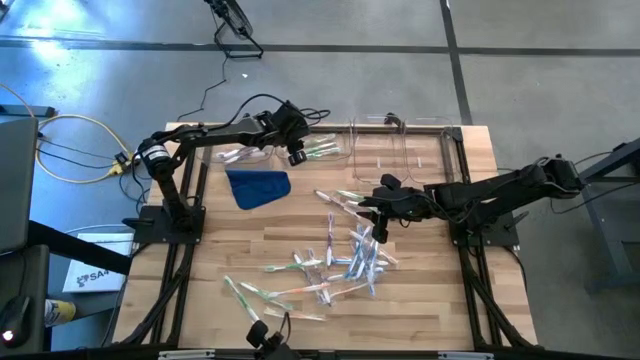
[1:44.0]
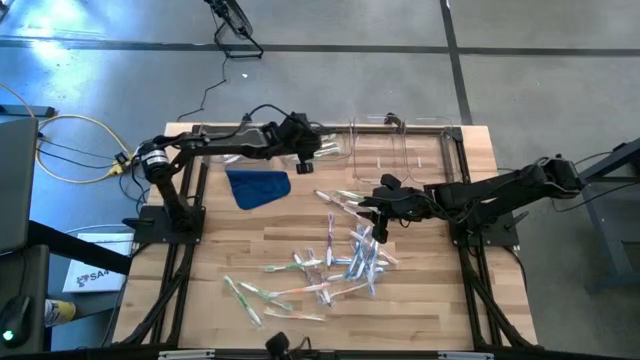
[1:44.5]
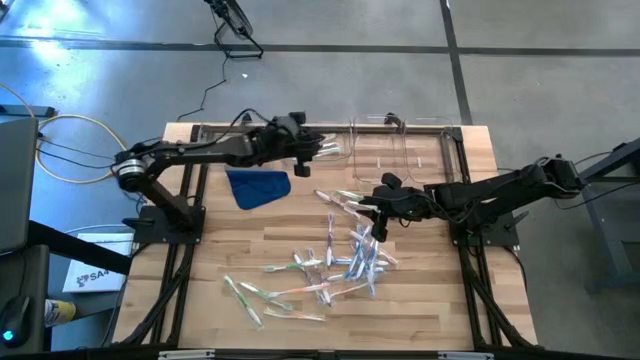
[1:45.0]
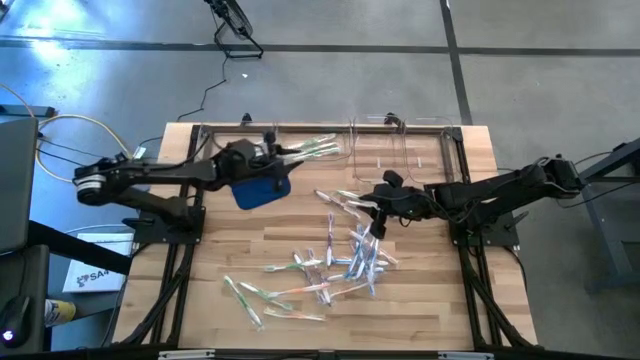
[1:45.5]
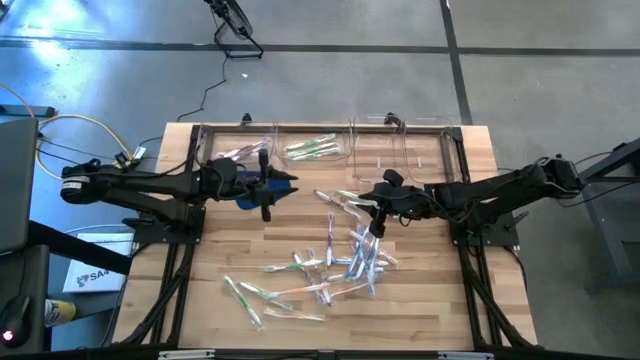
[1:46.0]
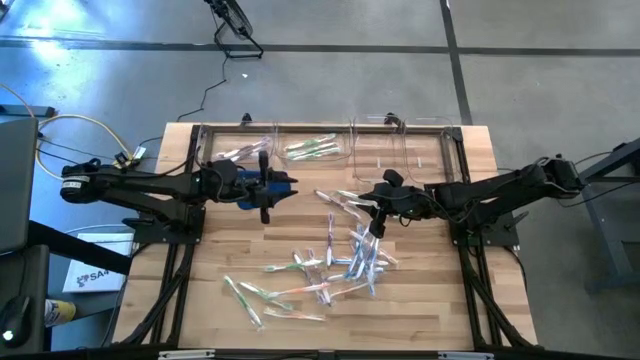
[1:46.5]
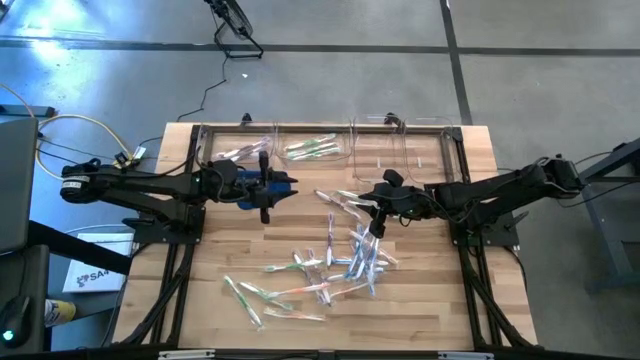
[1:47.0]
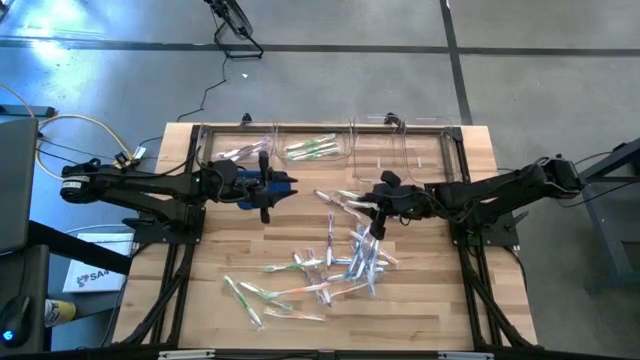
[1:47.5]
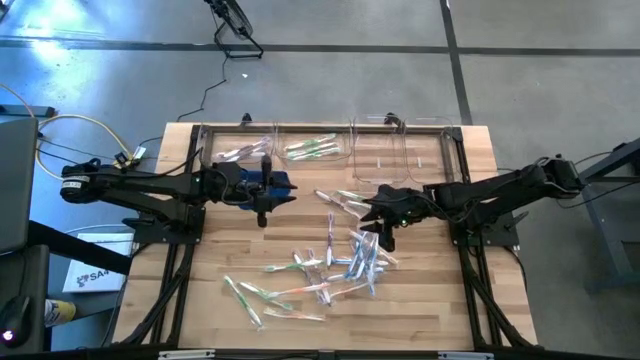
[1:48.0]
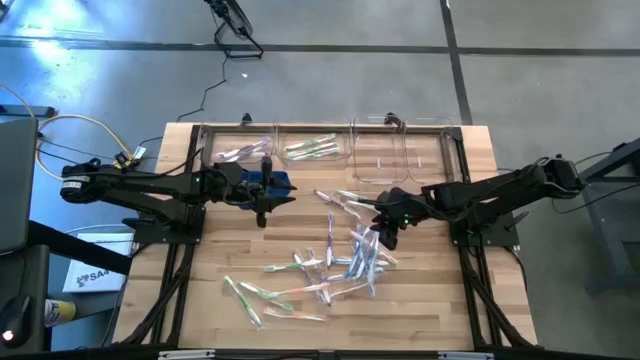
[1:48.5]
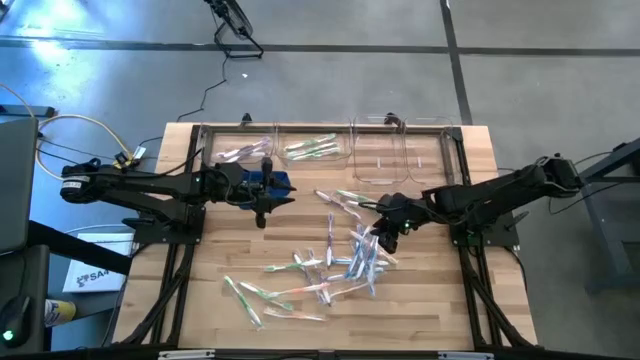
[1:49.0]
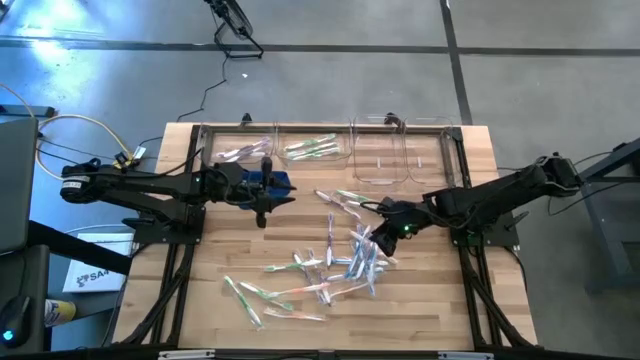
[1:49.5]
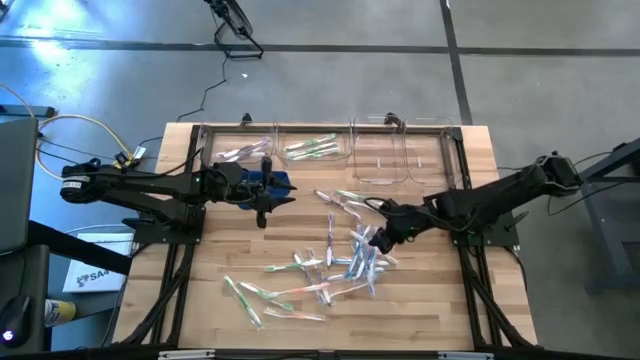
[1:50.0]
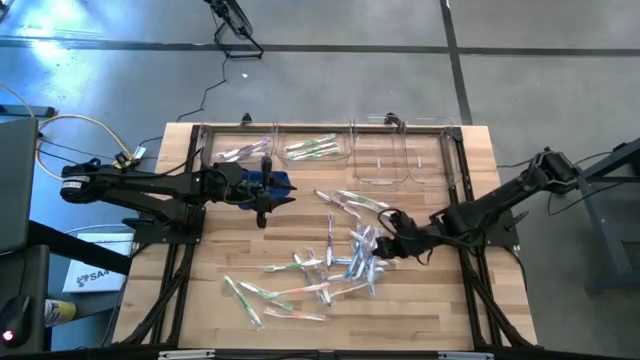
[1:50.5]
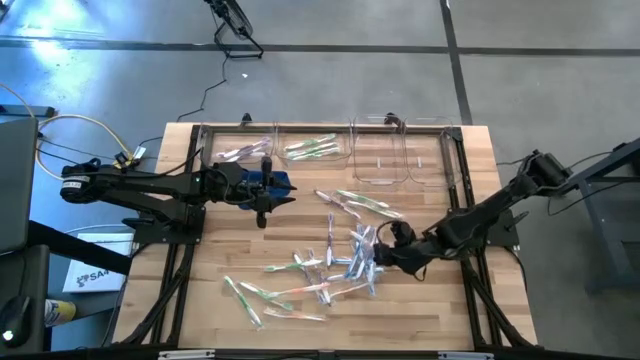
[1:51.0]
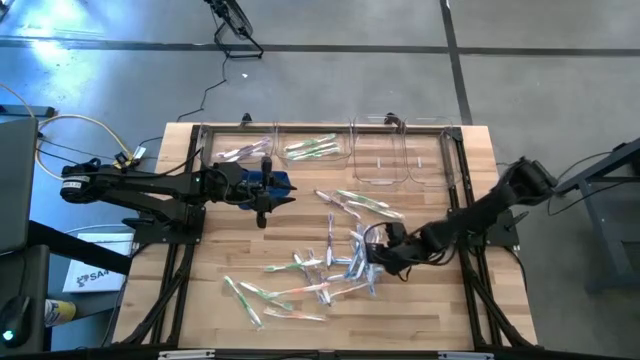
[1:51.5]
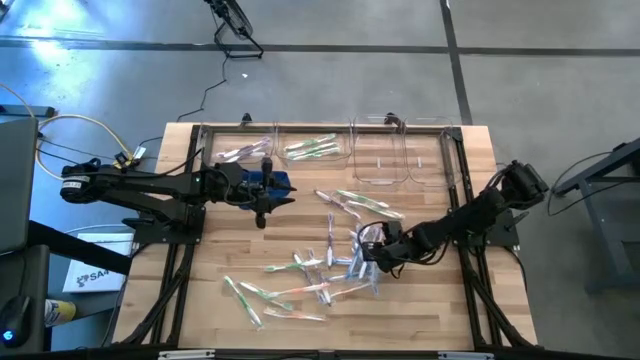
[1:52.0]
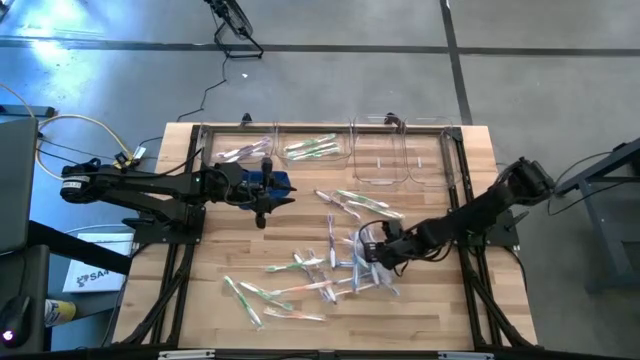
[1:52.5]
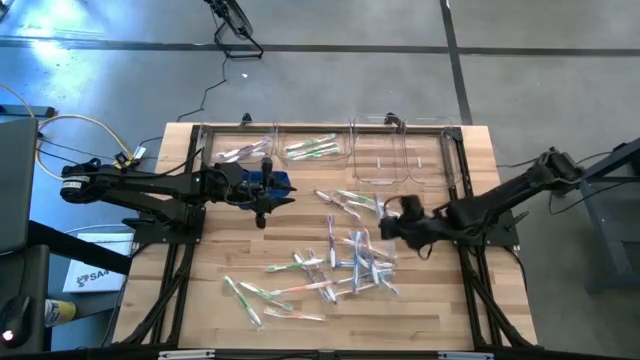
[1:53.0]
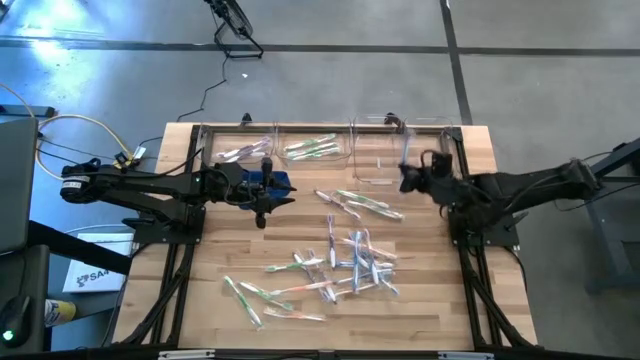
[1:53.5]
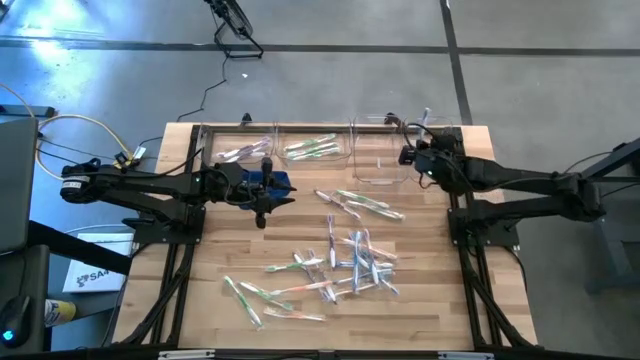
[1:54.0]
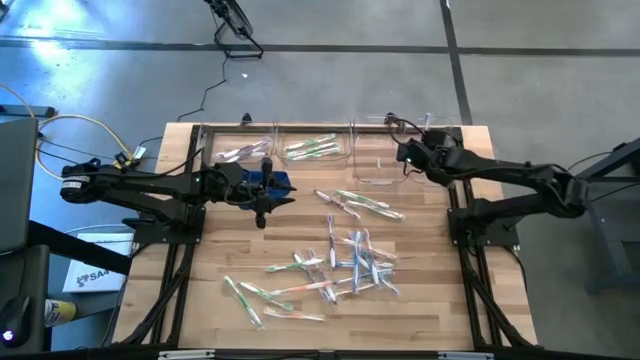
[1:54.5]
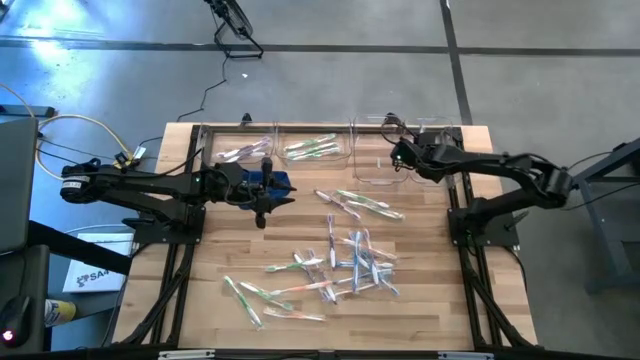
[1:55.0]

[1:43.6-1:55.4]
Task: Pick & Place Toothbrushes
Put the blue toothbrush into the right transparent bin

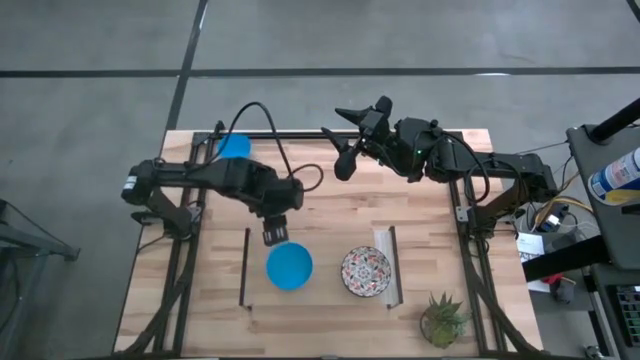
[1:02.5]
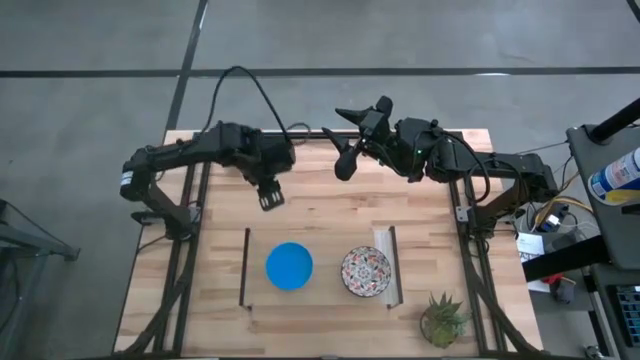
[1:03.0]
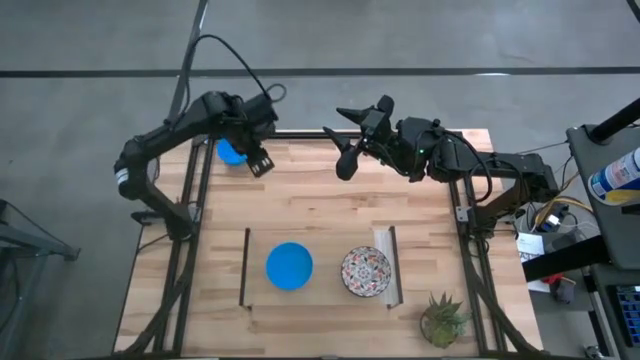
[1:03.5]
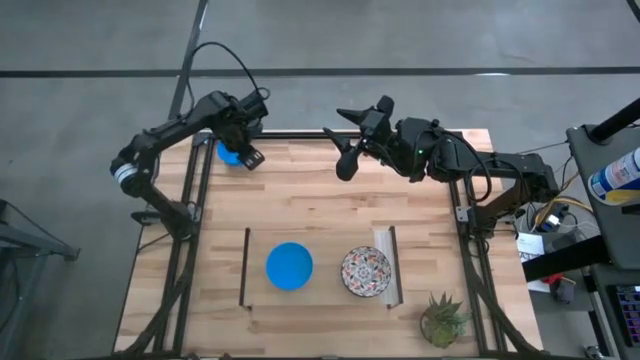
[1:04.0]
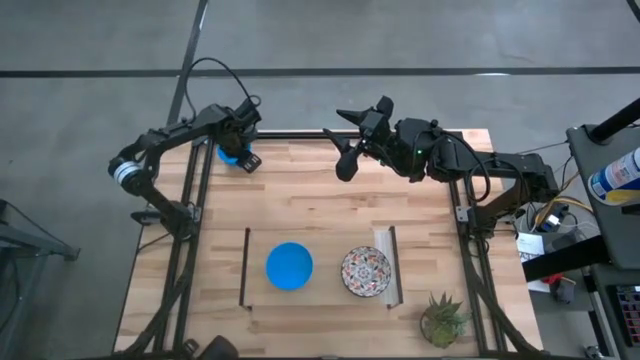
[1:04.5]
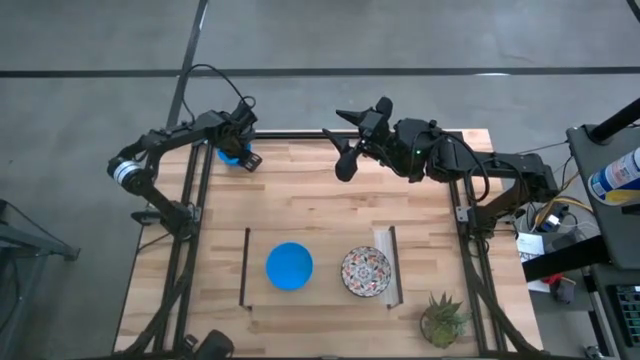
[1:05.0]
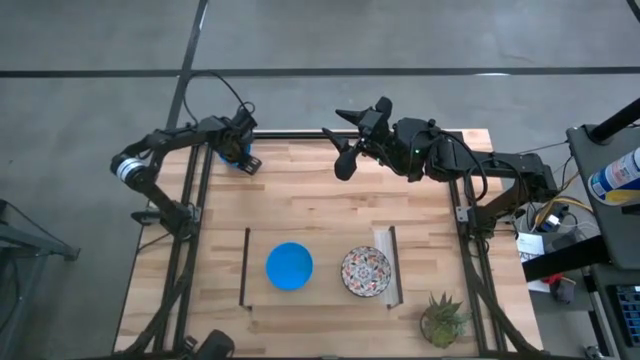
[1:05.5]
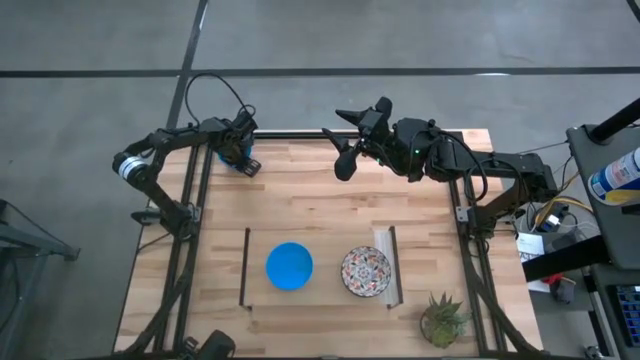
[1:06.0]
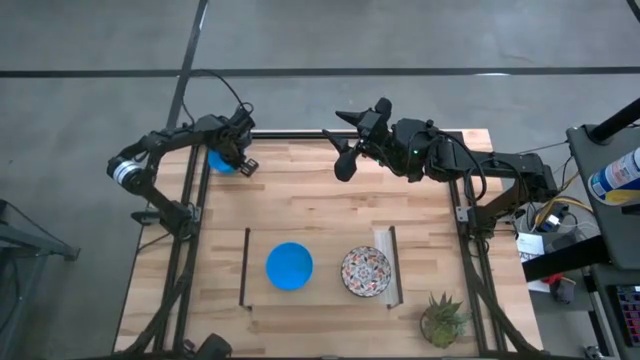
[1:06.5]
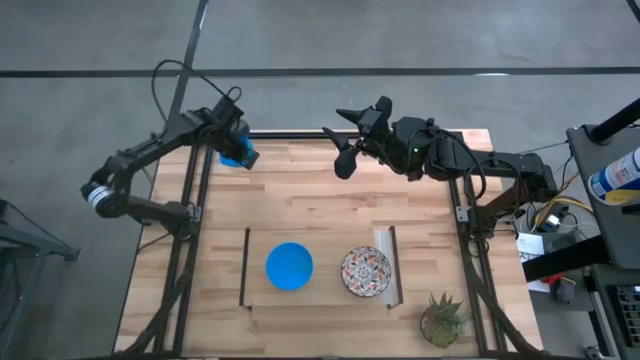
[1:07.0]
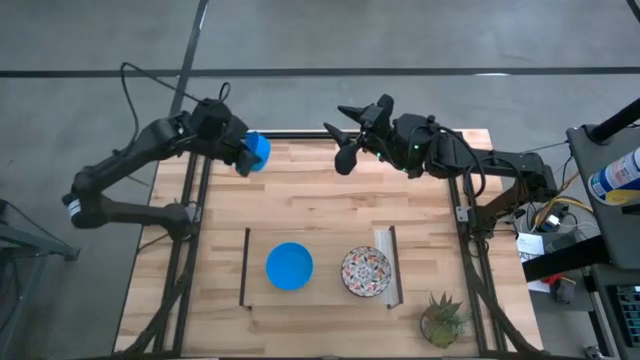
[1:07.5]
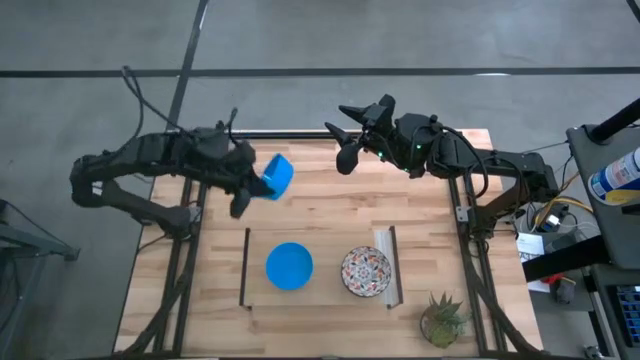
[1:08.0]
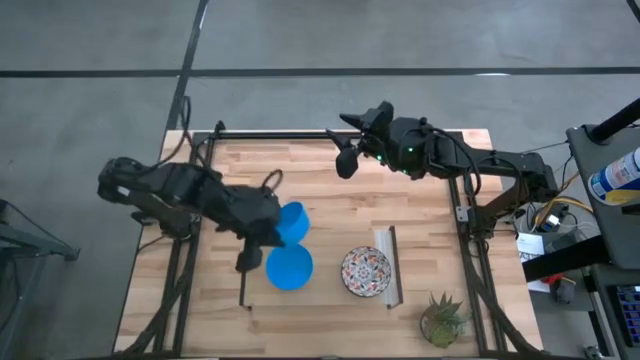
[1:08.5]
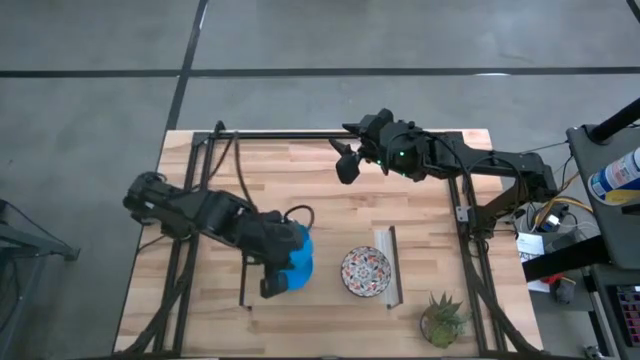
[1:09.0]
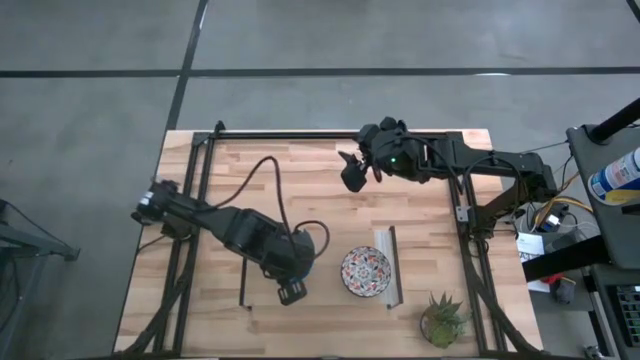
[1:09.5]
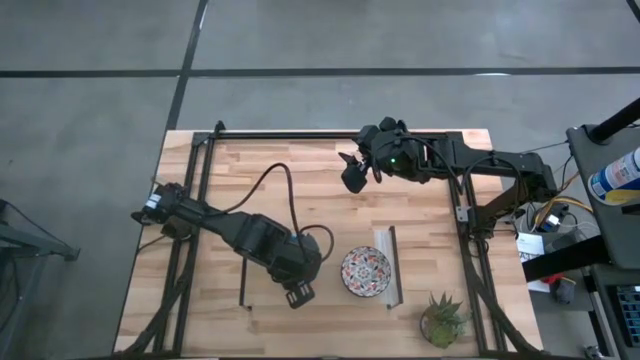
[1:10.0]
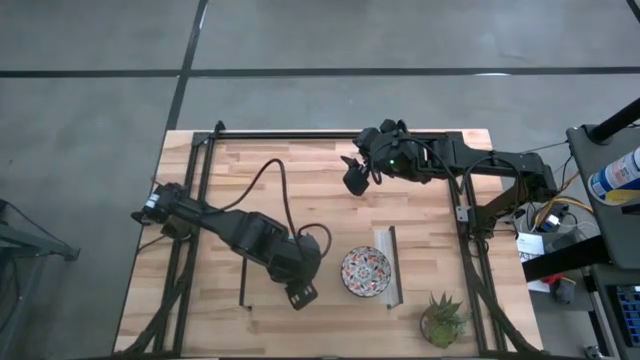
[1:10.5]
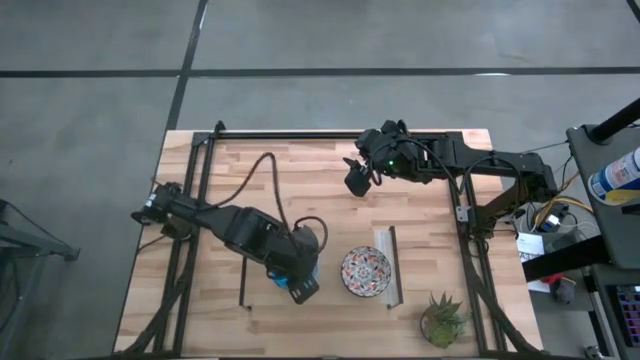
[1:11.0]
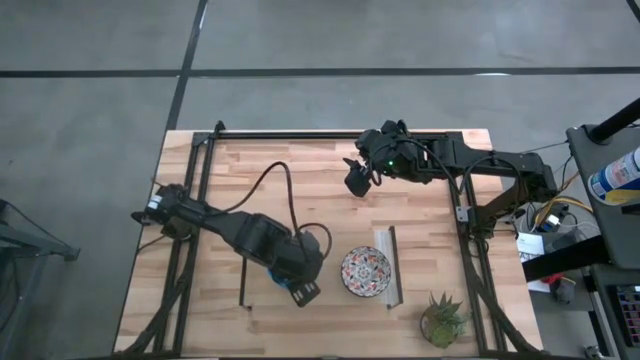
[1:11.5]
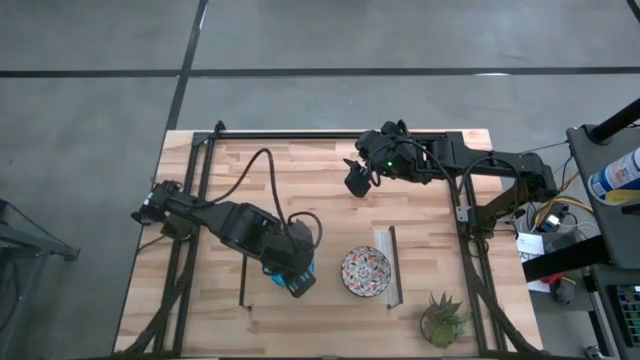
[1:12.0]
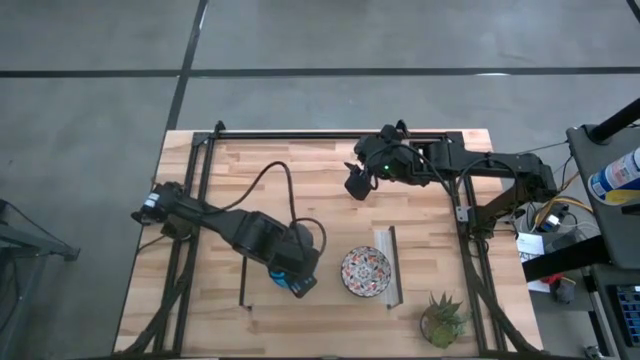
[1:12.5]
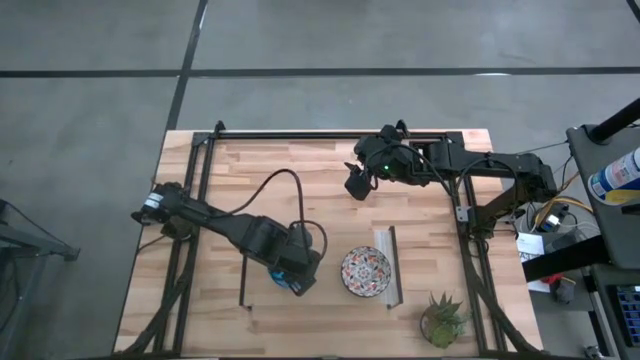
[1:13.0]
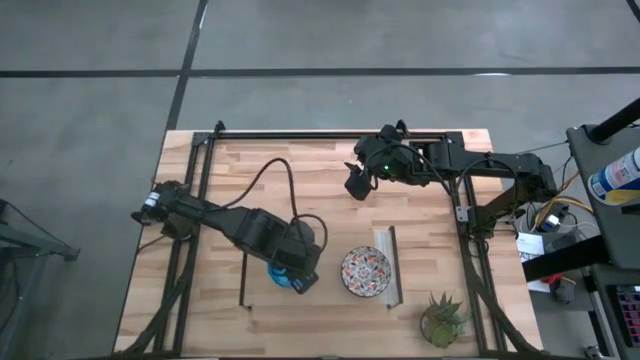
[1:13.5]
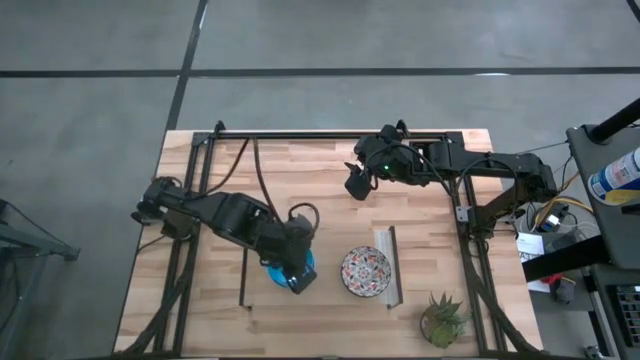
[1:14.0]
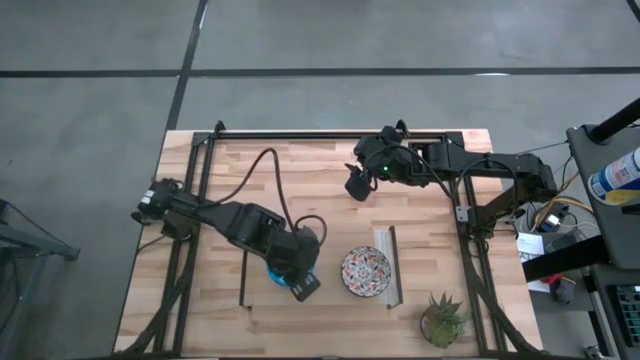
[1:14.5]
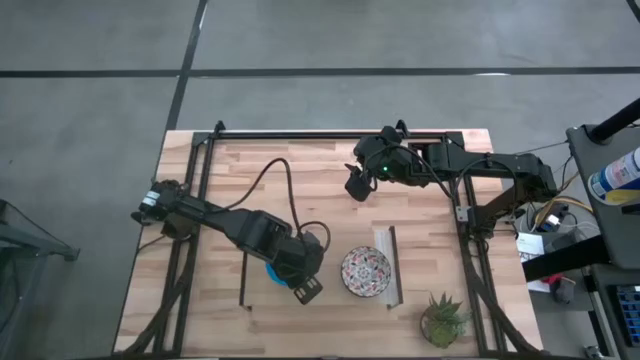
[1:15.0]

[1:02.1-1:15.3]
Task: Pick & Place Mini bowls
Stack the blue bowl on top of the other blue bowls on the shelf
